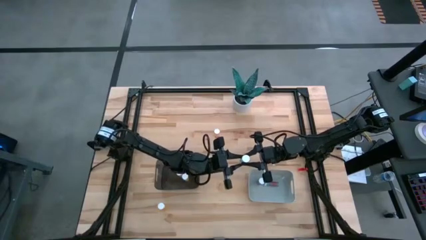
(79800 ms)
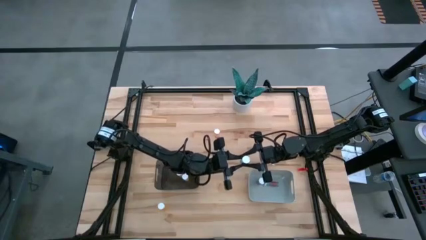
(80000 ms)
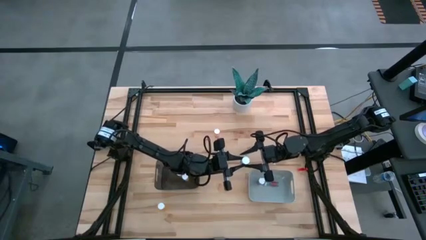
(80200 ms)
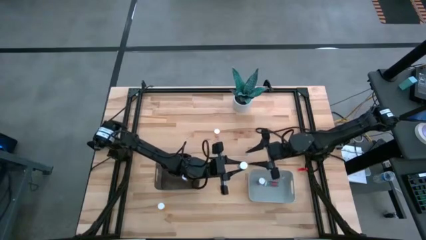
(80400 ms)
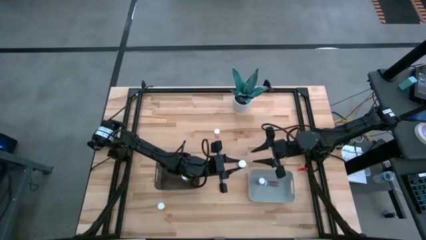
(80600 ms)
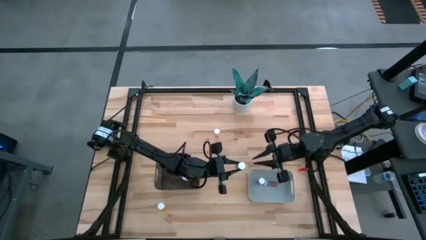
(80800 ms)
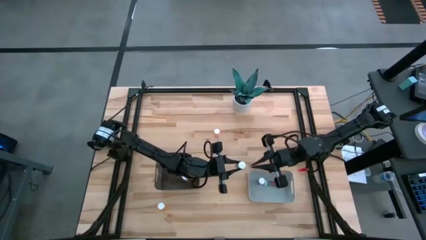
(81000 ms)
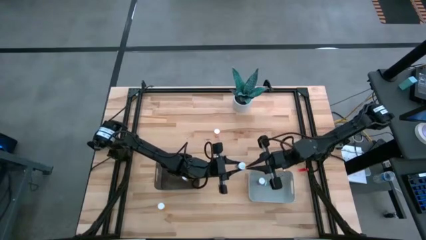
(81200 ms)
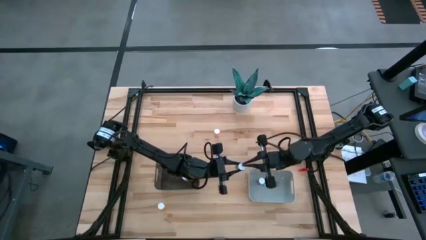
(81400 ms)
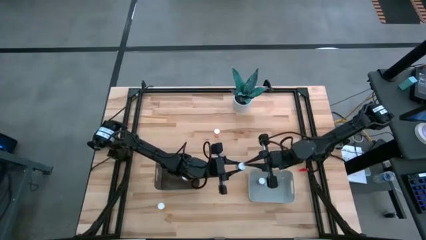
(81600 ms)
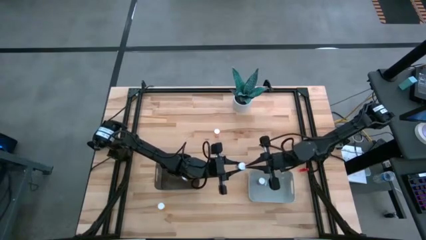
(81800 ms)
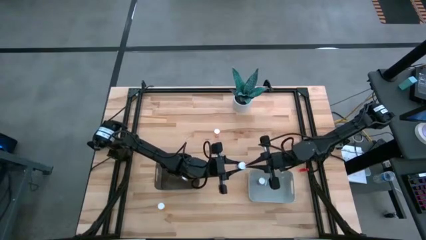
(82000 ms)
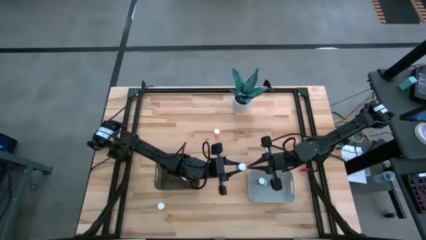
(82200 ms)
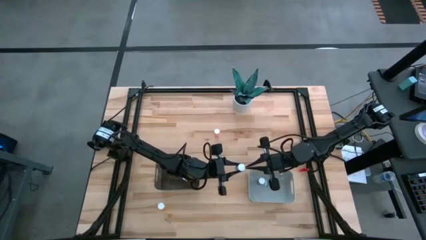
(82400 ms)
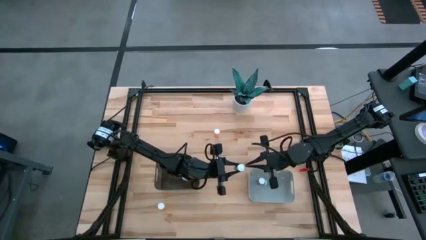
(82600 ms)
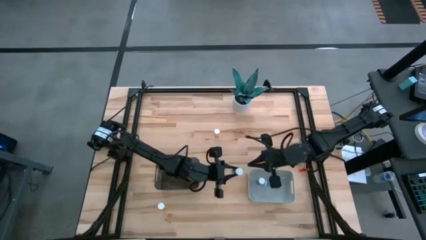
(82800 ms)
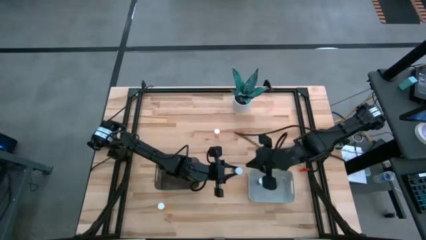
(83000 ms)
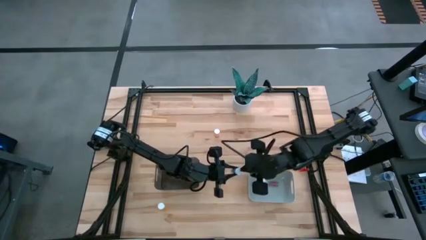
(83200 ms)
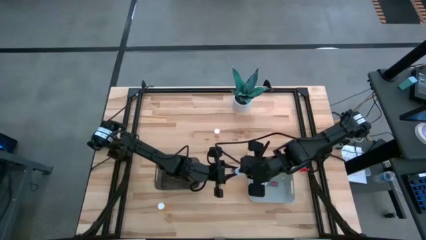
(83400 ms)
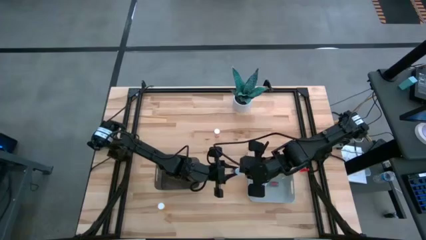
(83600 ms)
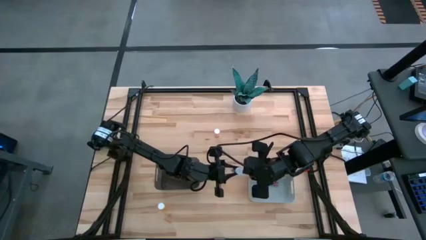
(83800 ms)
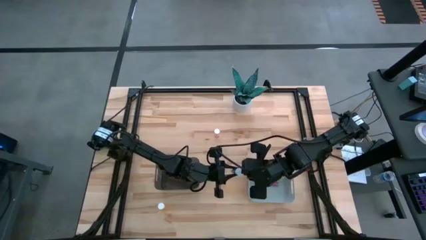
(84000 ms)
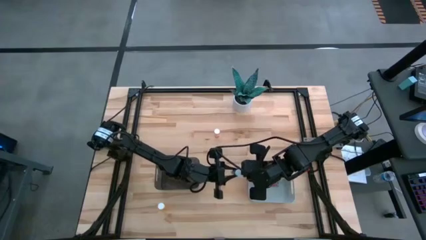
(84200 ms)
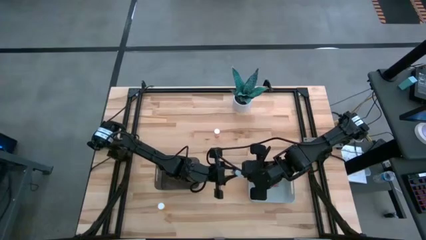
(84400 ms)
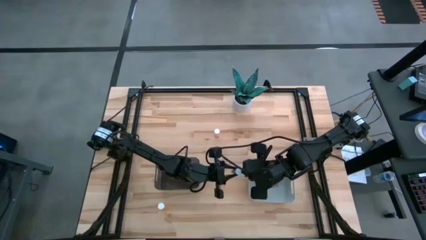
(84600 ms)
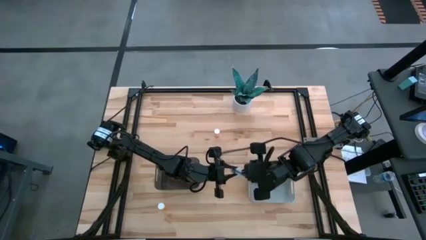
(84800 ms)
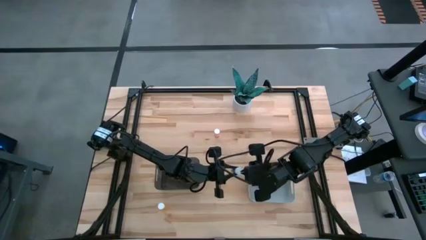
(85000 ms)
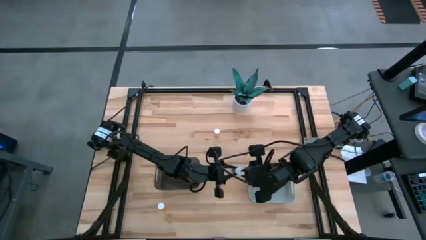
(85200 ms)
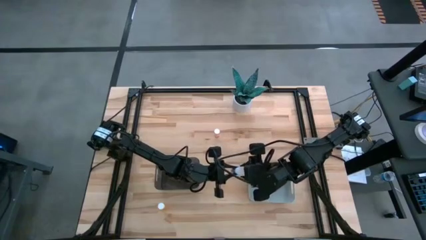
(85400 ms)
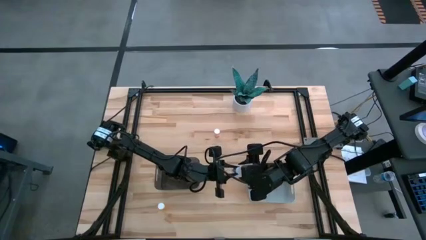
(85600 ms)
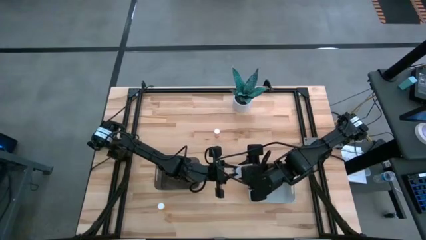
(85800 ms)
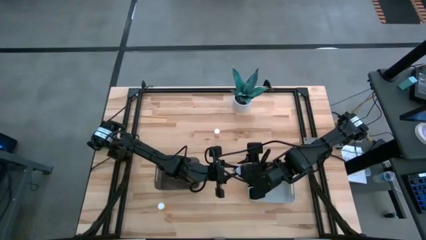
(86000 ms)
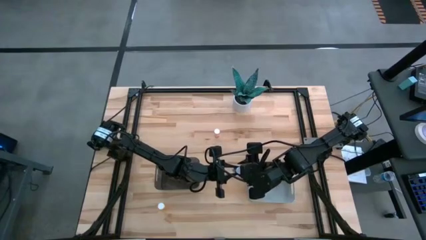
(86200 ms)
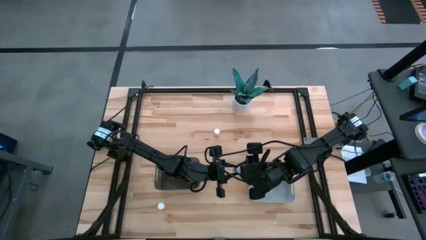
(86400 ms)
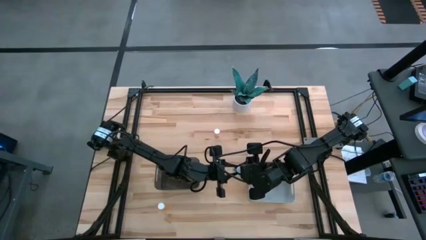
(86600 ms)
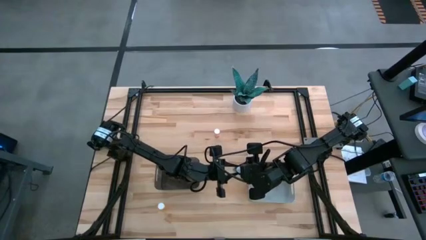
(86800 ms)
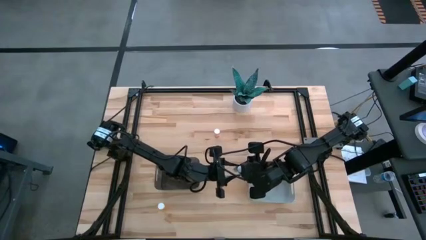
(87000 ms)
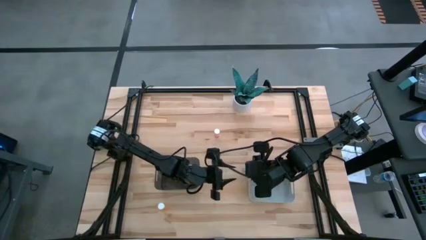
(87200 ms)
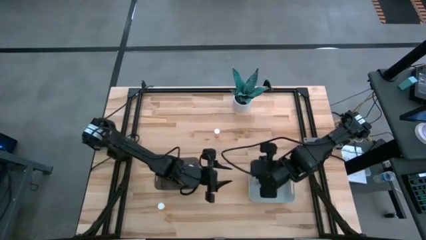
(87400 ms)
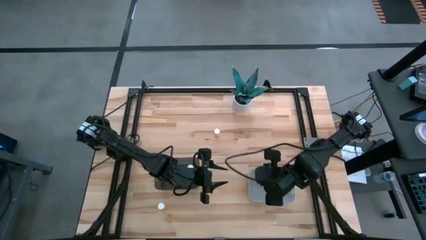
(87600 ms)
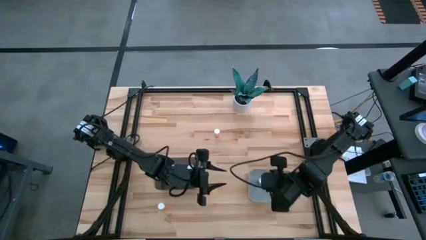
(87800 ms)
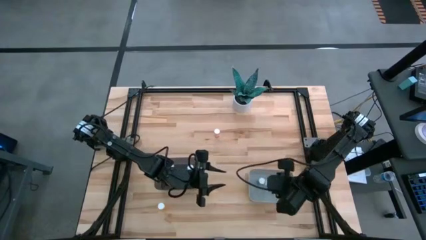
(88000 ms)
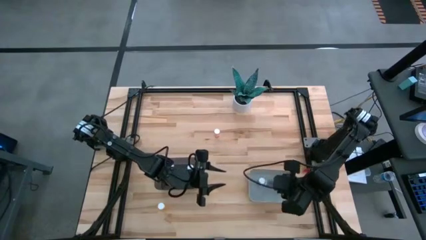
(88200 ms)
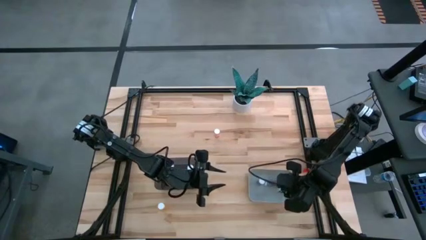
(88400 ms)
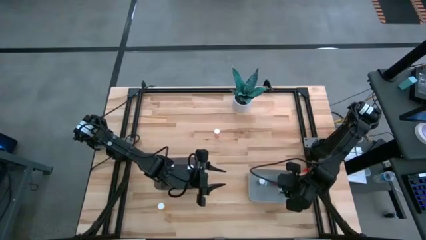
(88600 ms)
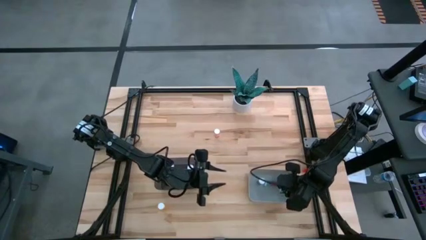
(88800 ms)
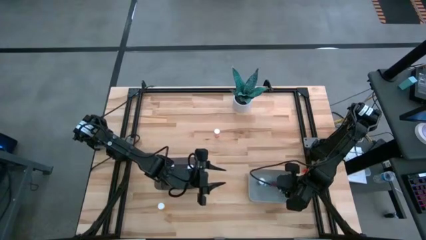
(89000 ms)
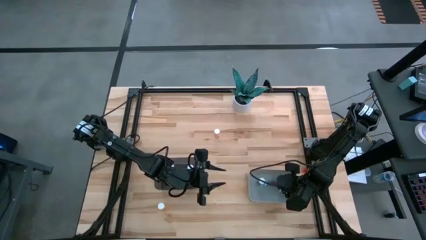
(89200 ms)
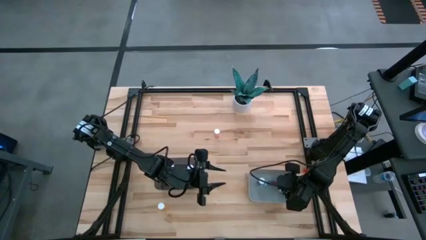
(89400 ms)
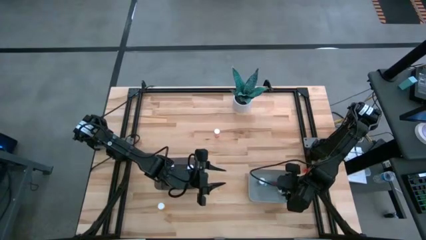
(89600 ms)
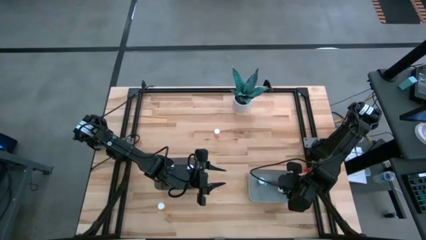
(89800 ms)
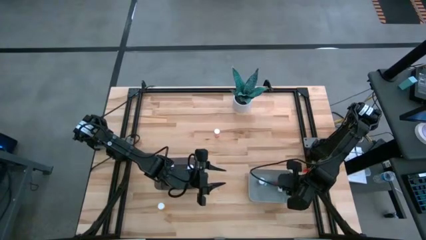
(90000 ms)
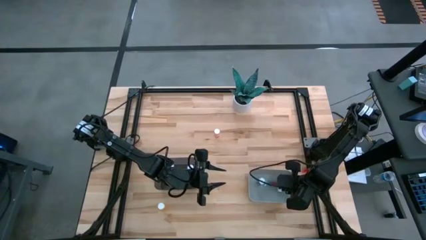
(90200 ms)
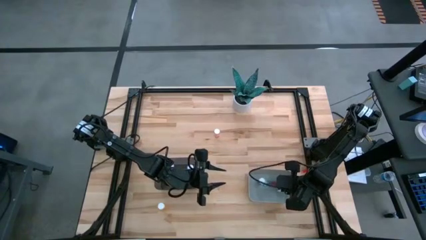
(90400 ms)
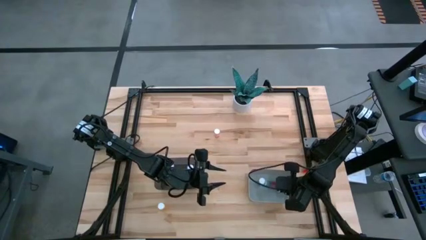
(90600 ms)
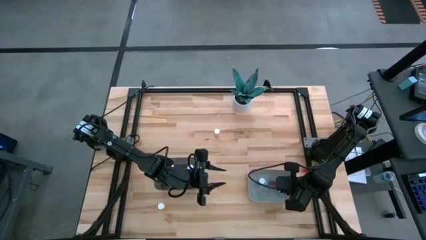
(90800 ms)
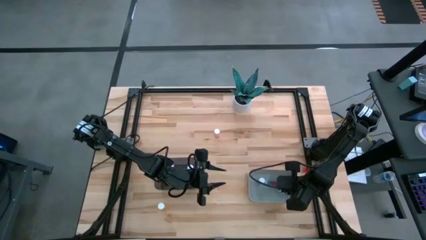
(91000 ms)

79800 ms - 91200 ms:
Task: Pick and place medicine bottles into bin by pill shape (circle, oval)
Put the blue capsule bottle into the gray bin
